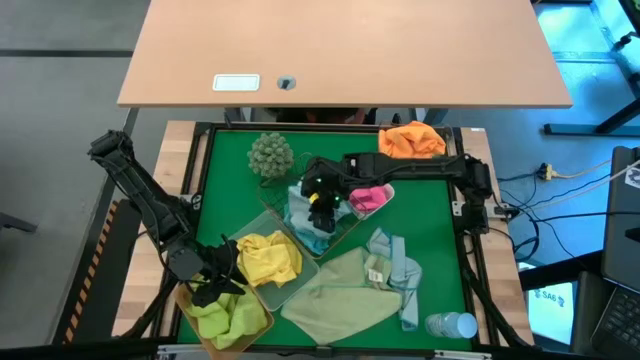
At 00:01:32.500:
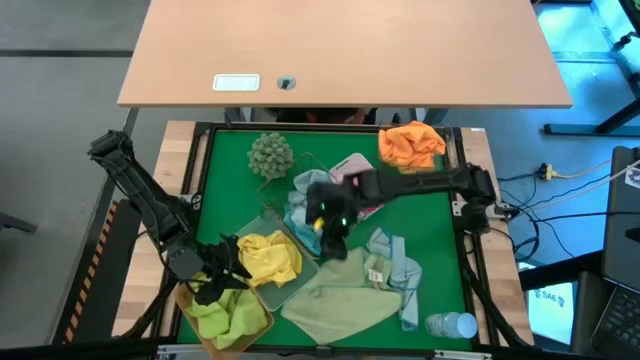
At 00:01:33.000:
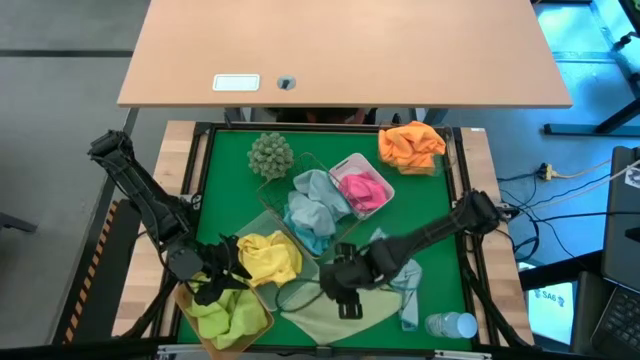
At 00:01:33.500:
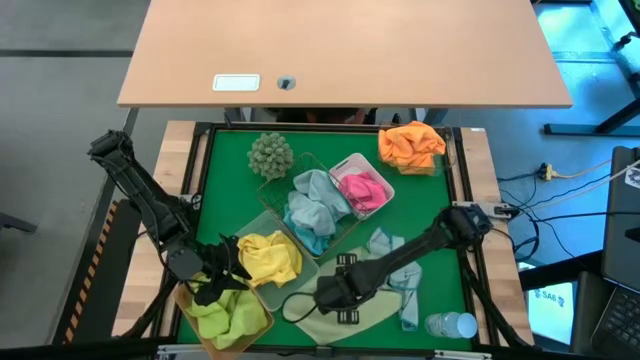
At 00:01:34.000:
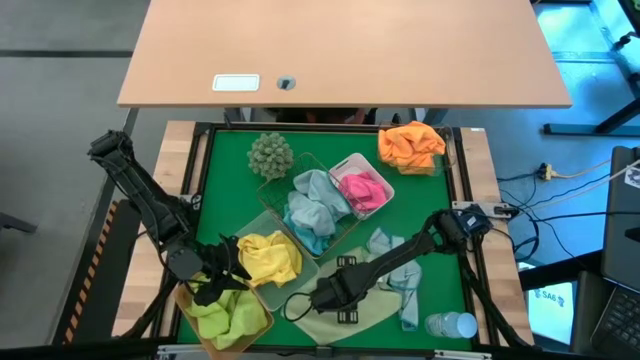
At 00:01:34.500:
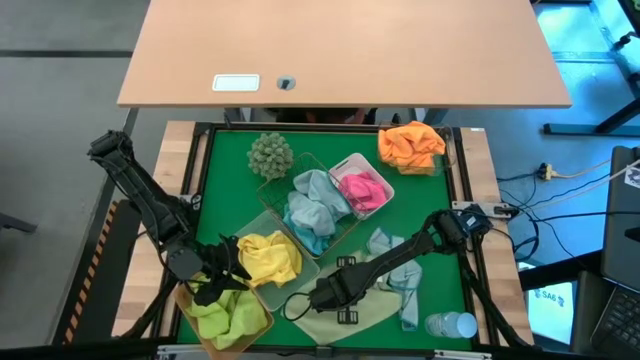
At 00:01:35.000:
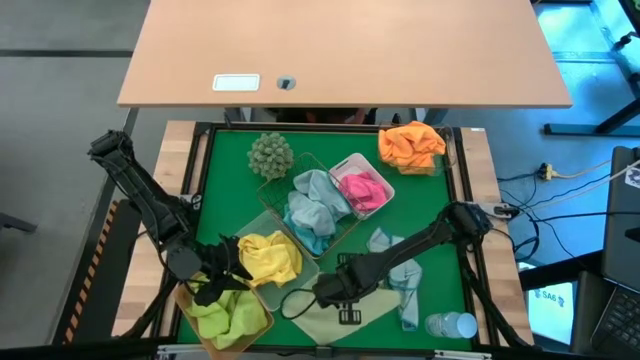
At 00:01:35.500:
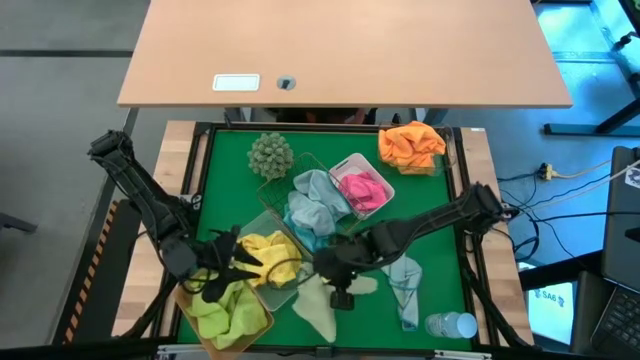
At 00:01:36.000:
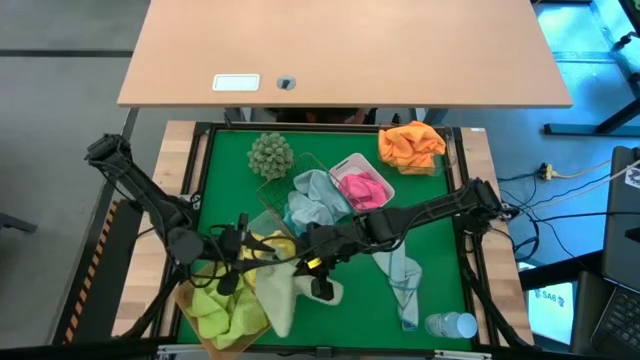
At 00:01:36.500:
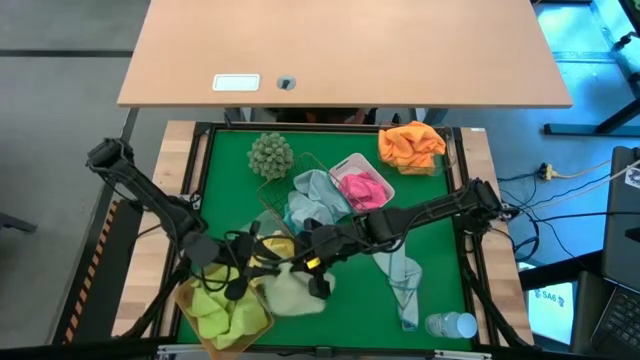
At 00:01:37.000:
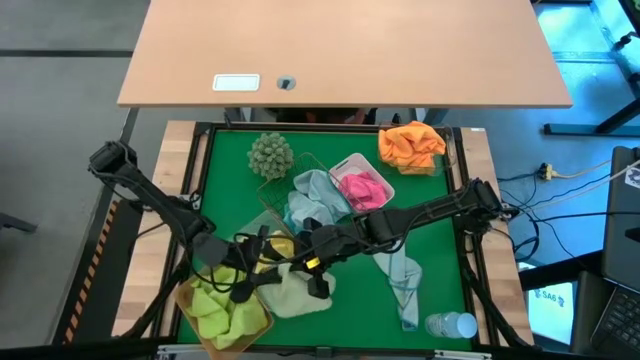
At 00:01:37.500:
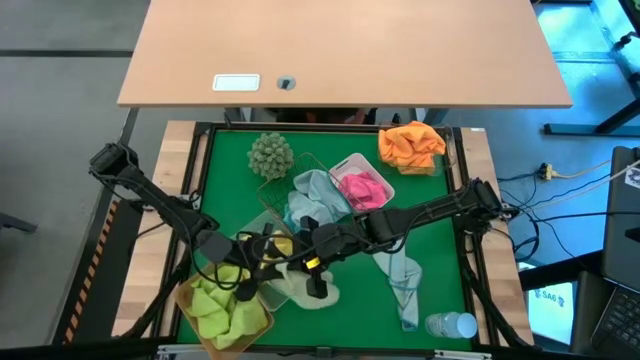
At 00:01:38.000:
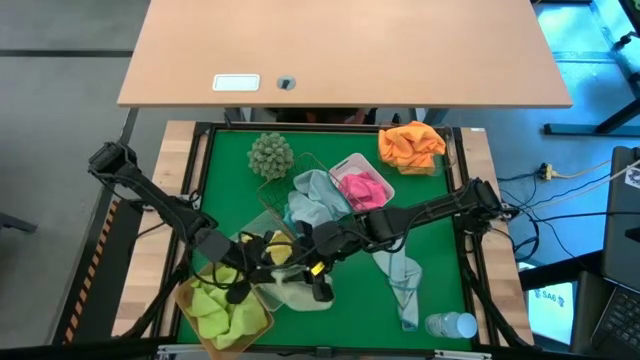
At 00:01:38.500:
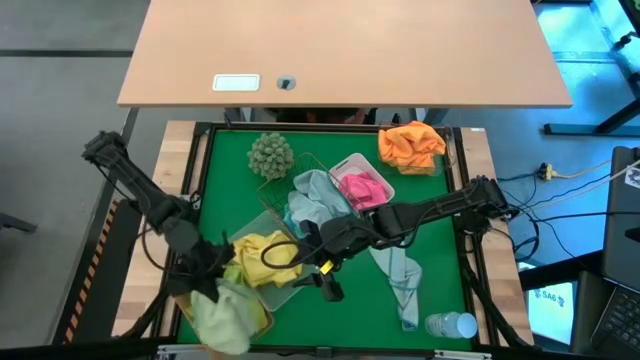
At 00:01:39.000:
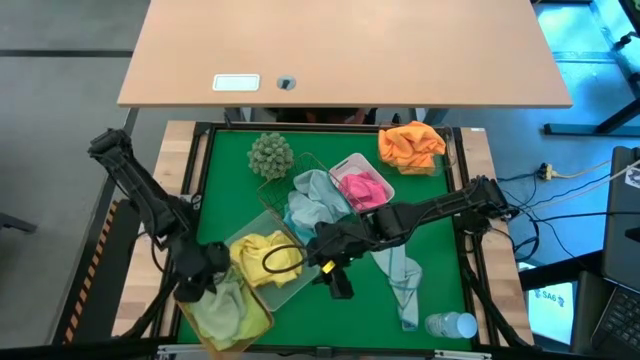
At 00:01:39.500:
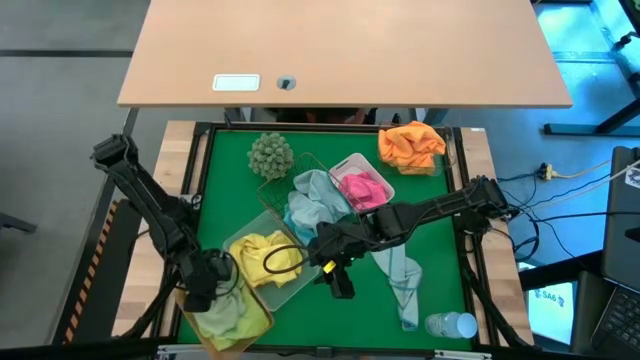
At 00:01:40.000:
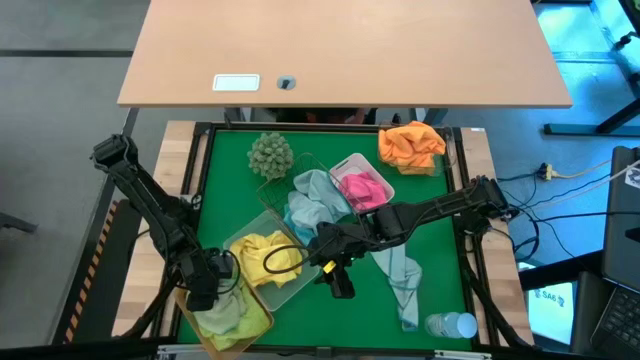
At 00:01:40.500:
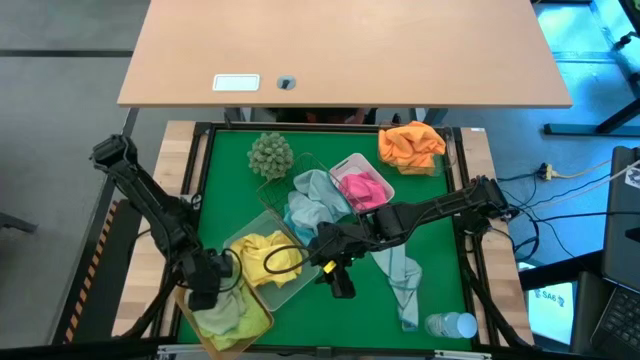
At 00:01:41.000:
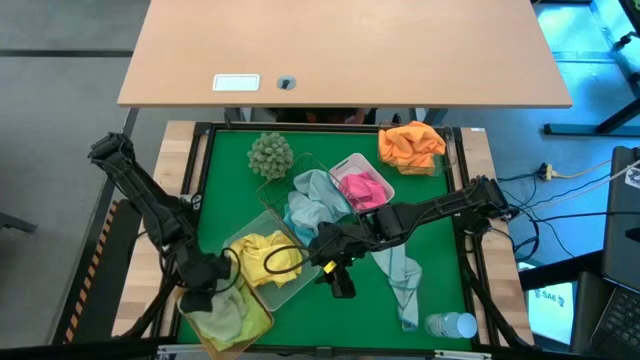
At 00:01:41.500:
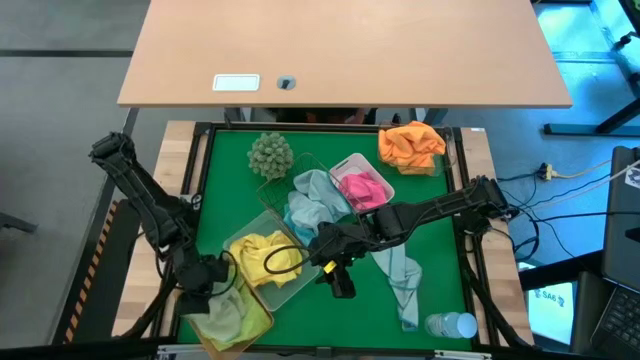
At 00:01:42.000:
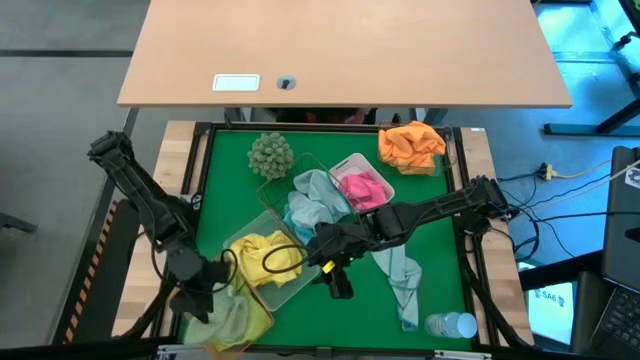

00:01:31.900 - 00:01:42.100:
Task: Sort microfiber towel by color & place in baskets
Put the green towel into the orange bin

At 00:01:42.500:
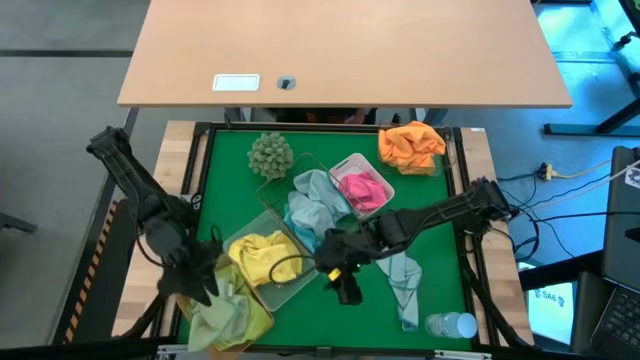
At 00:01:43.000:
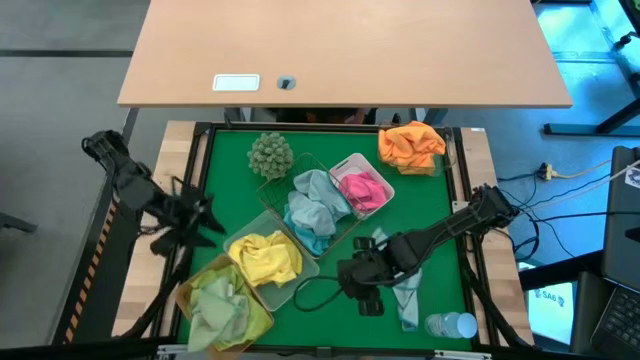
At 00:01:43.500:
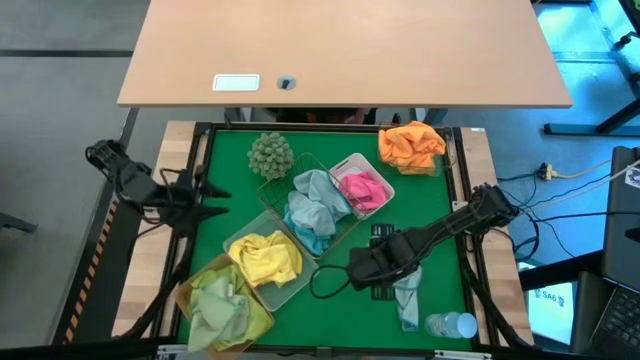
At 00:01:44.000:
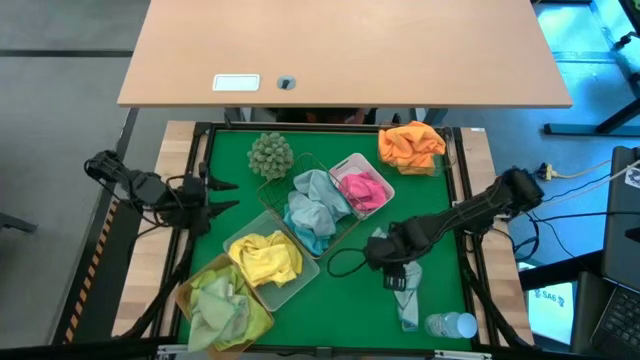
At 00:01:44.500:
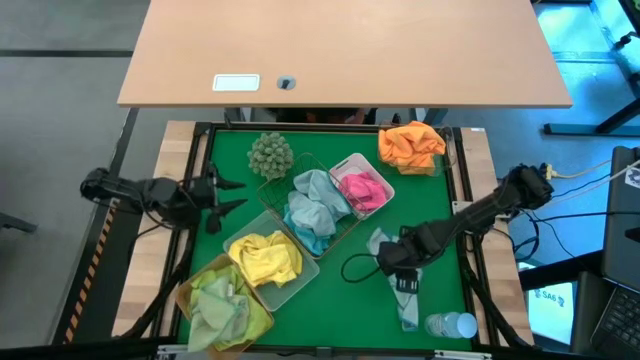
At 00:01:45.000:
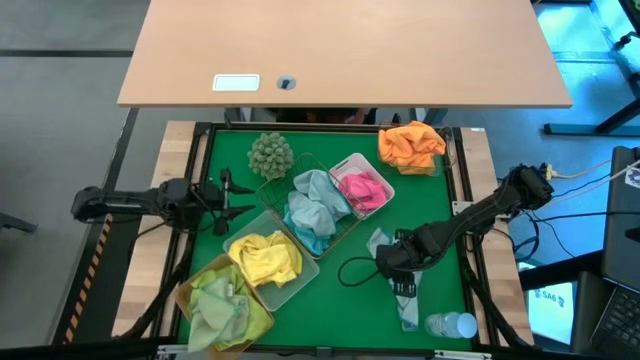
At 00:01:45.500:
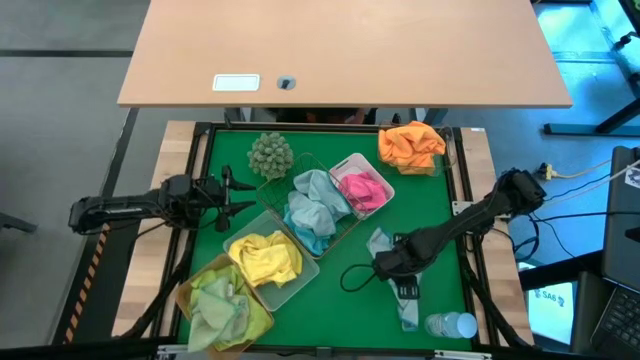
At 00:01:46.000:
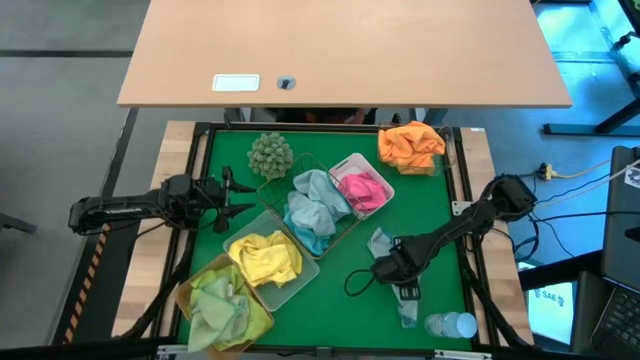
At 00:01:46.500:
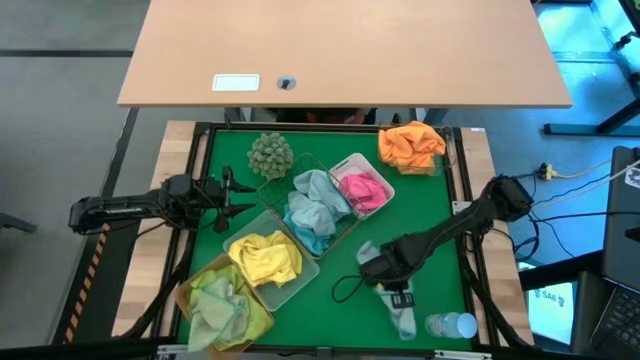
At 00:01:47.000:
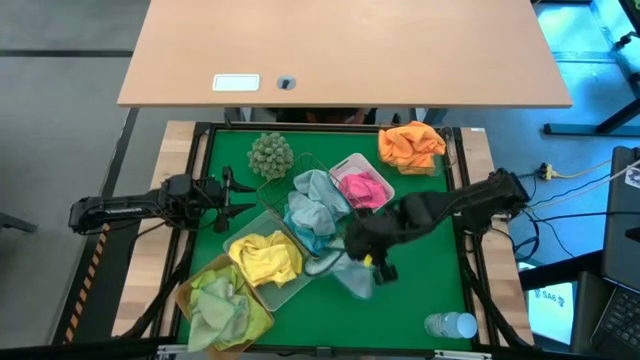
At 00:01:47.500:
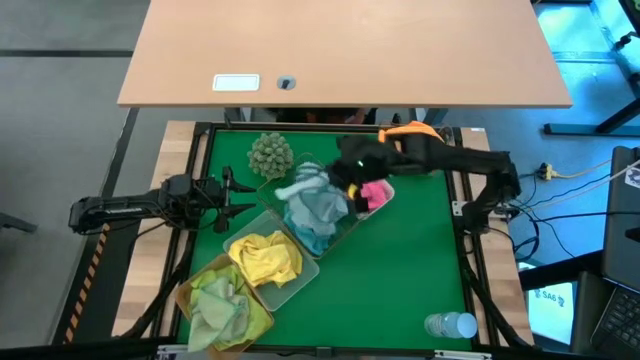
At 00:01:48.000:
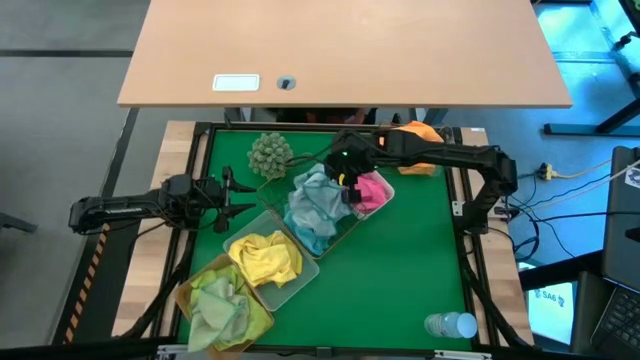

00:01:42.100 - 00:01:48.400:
Put the blue towel into the black bin

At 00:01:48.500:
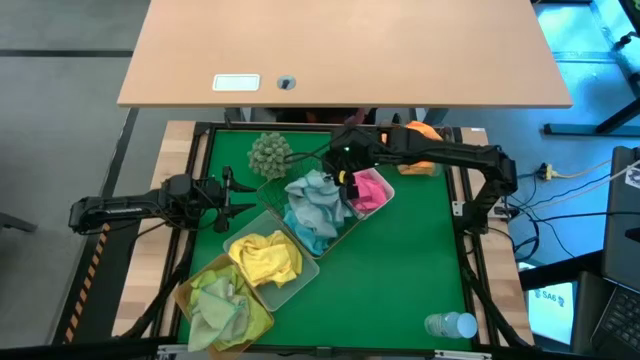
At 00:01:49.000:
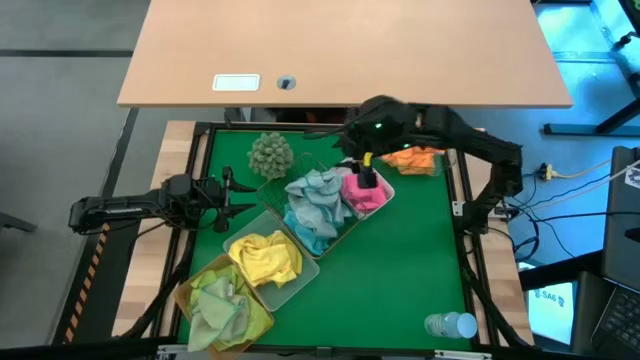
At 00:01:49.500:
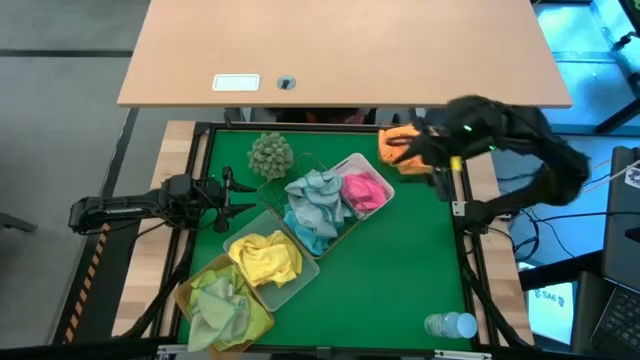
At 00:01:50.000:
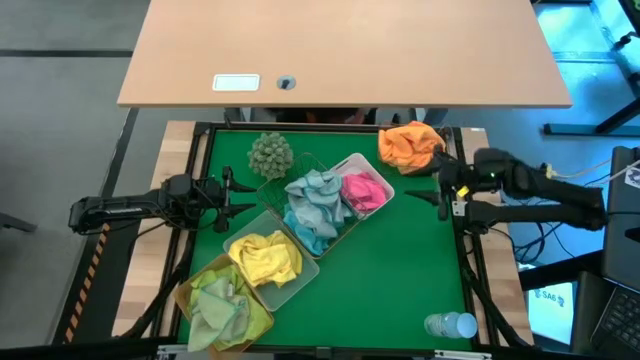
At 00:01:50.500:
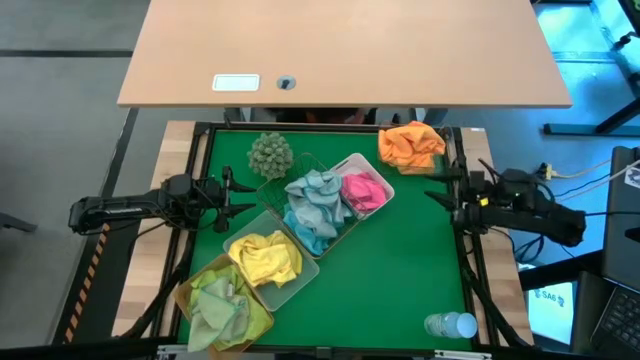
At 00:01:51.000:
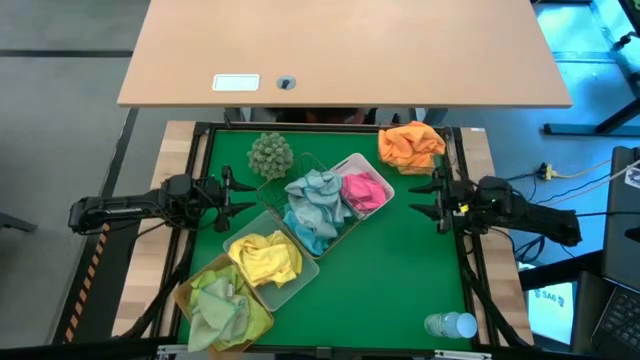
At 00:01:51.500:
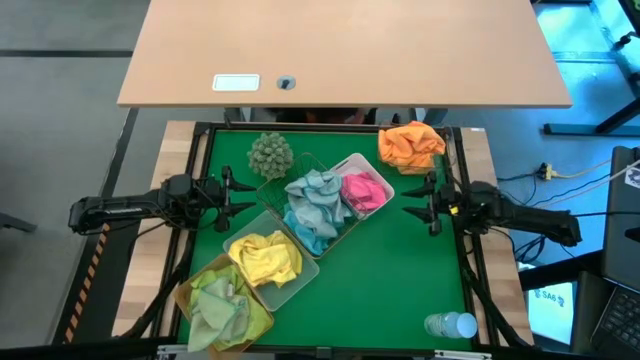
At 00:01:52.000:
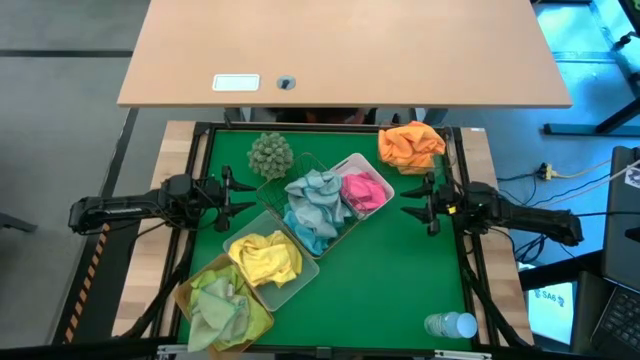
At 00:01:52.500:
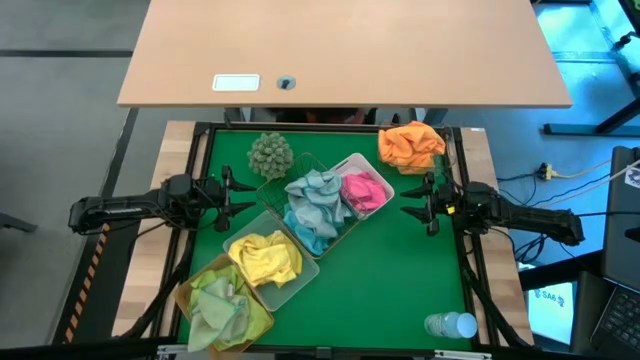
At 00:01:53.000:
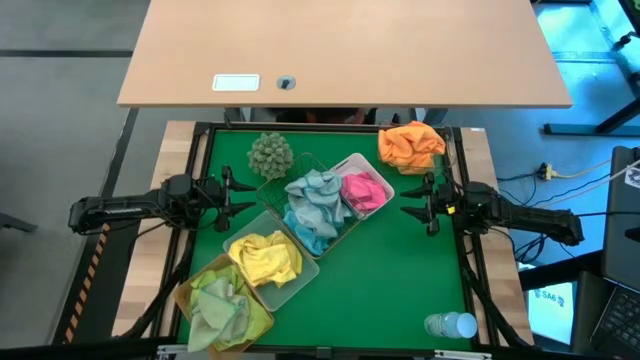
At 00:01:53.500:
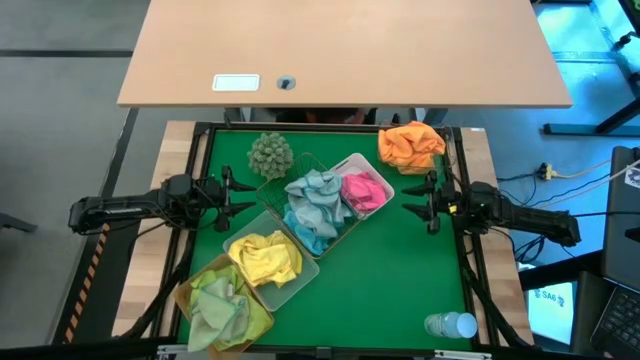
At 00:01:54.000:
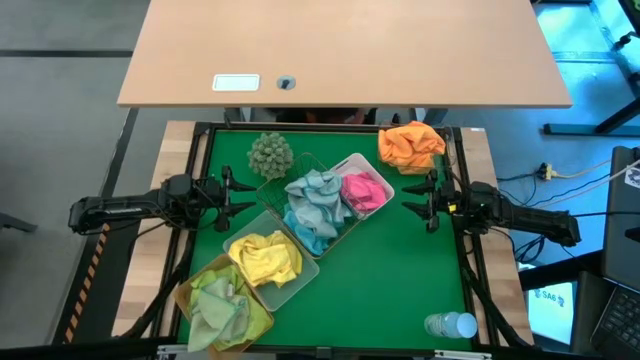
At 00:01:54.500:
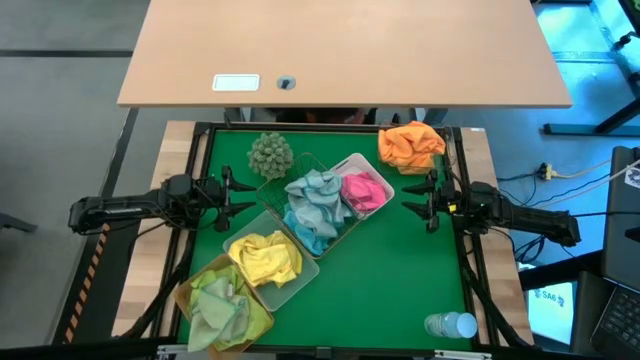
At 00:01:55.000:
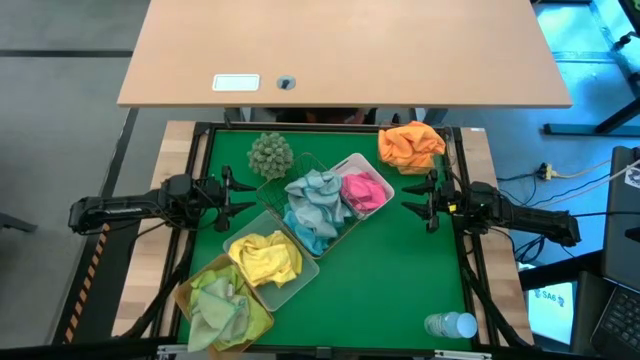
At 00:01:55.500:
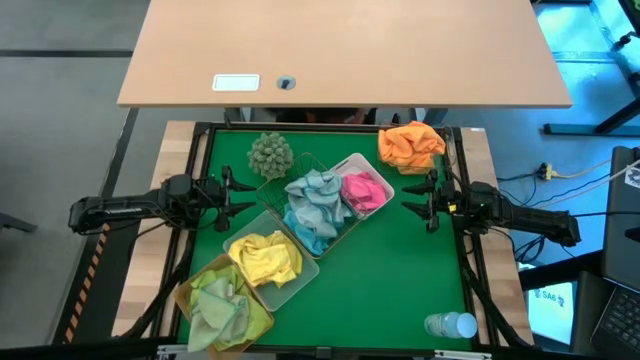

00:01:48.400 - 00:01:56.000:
Return to Home Position
